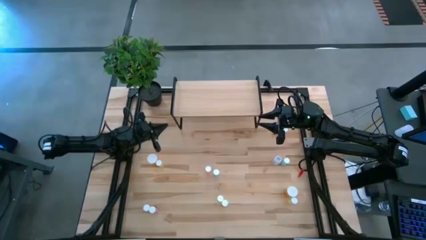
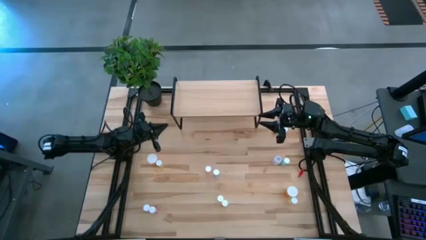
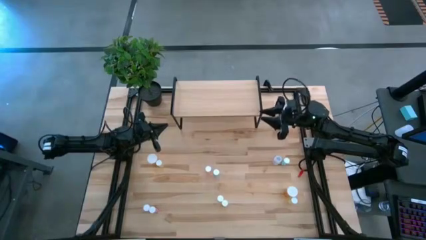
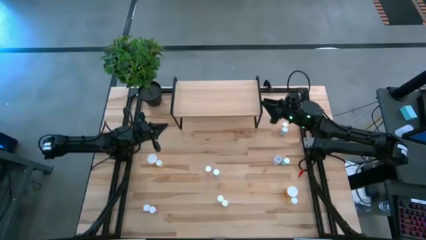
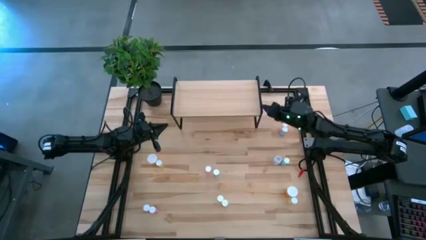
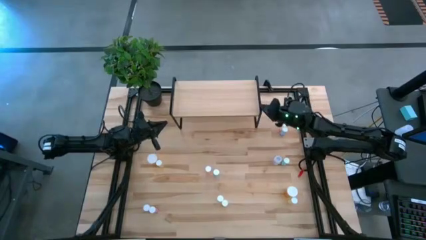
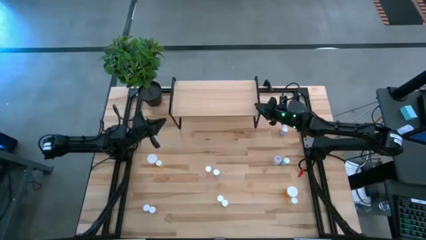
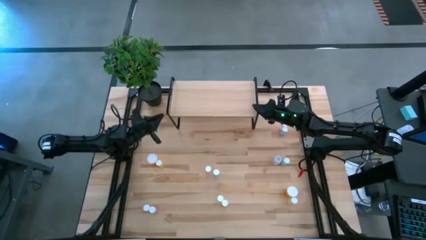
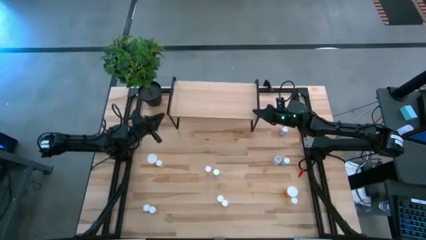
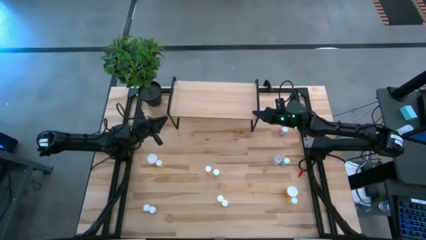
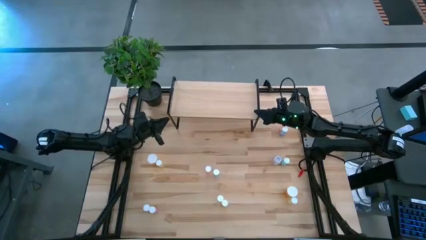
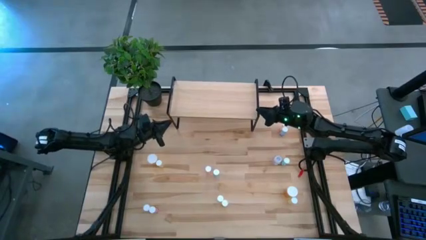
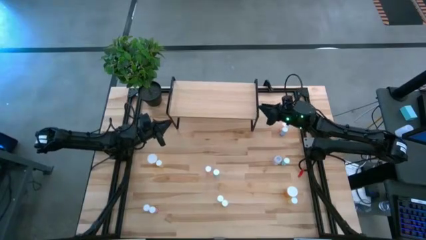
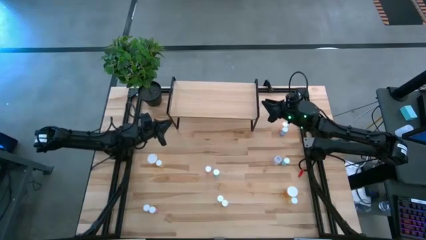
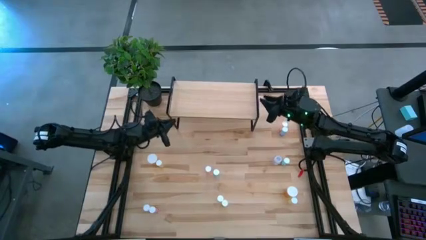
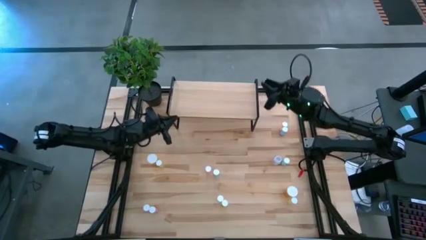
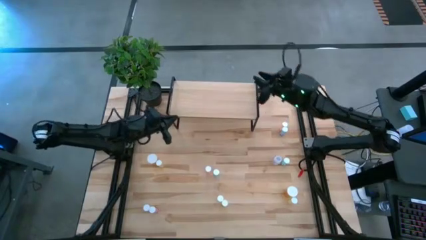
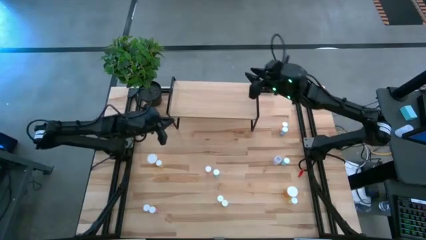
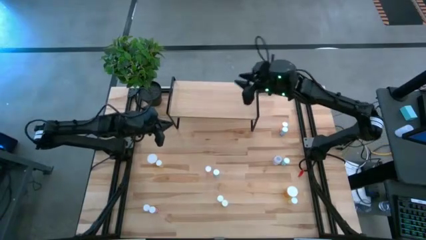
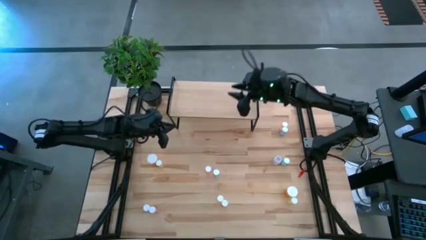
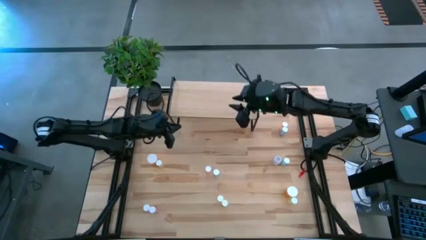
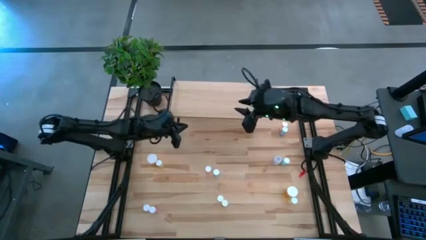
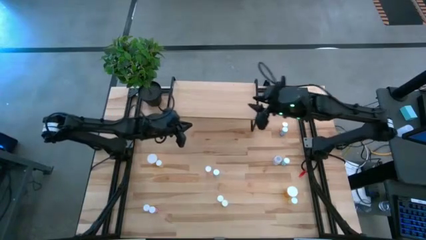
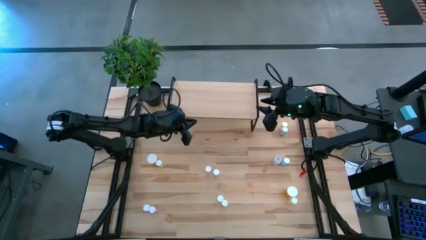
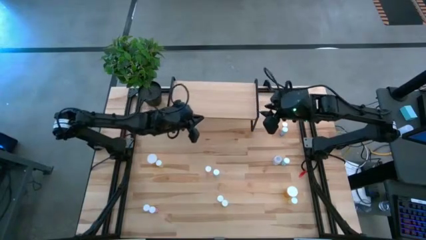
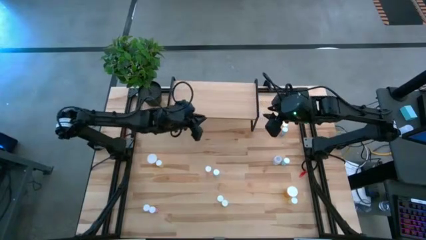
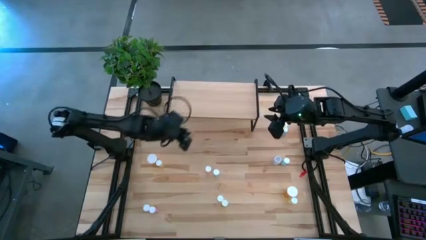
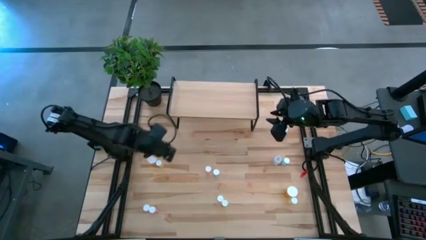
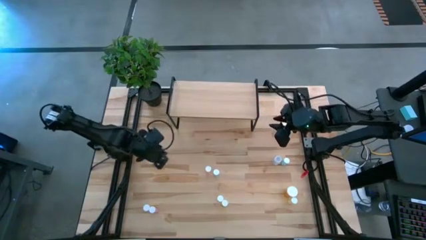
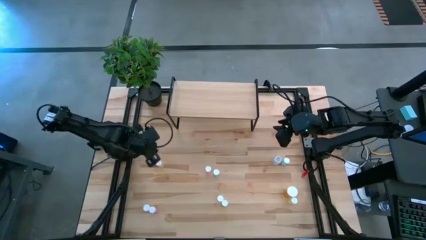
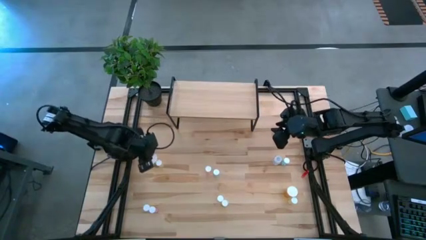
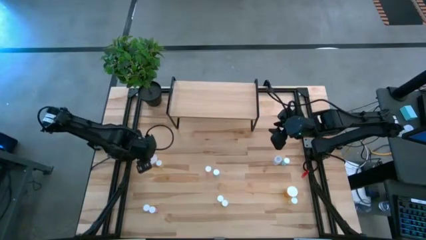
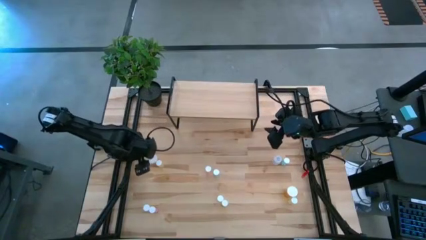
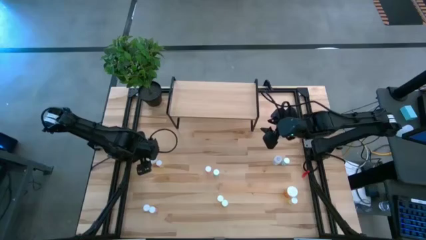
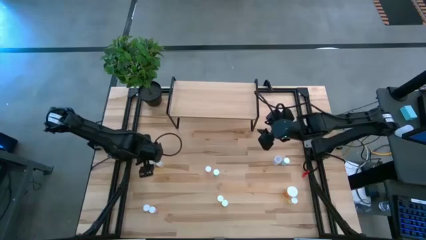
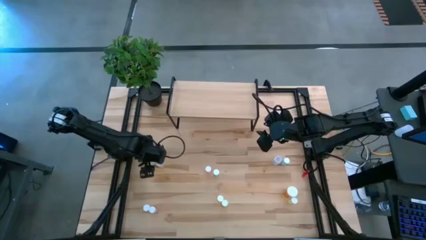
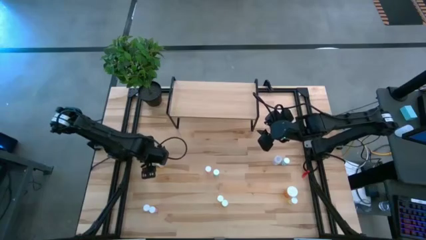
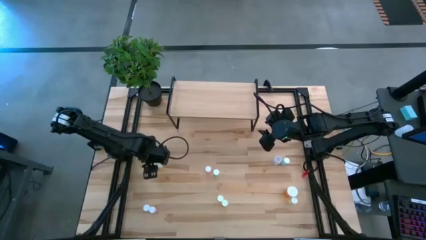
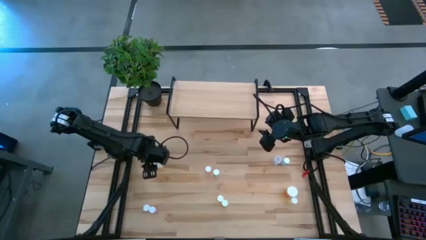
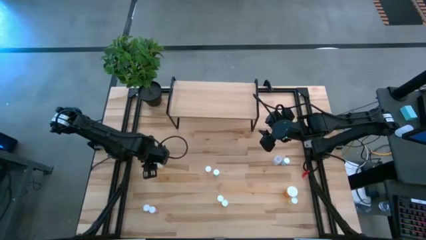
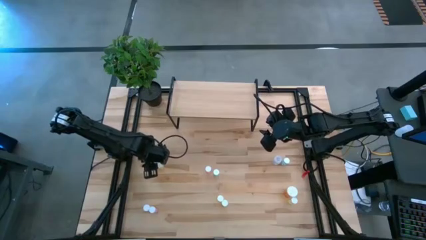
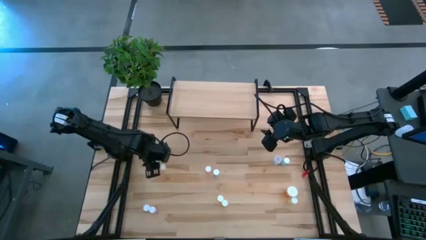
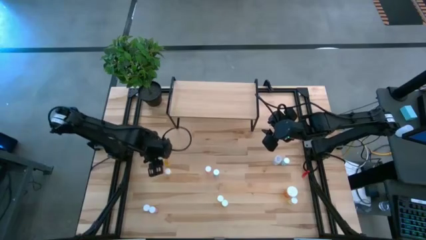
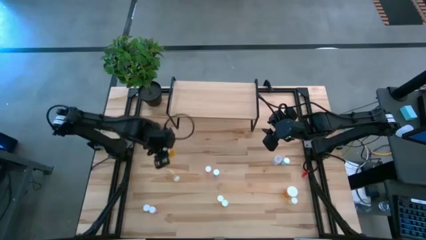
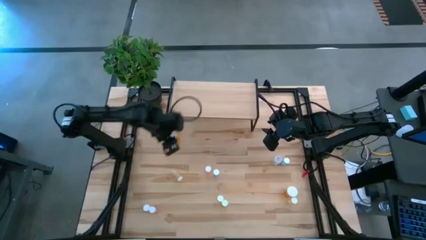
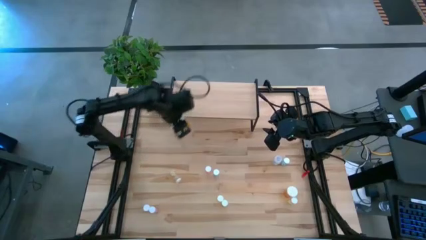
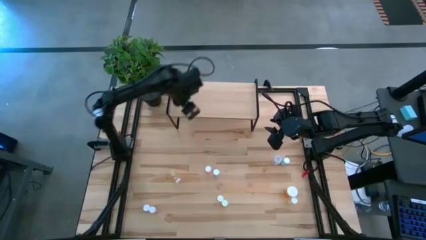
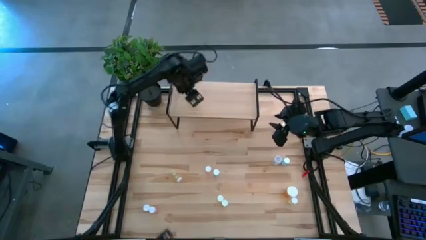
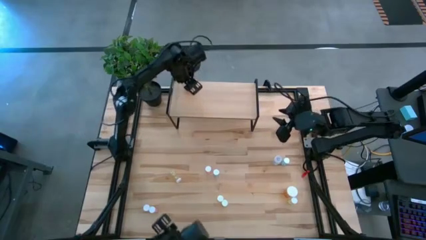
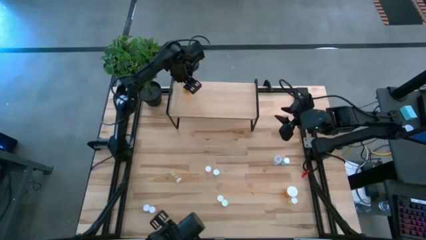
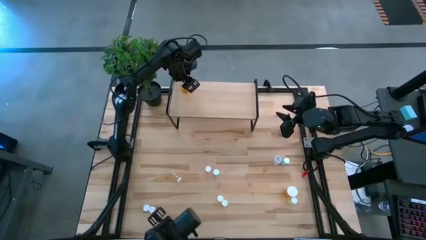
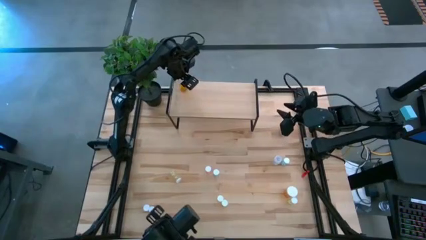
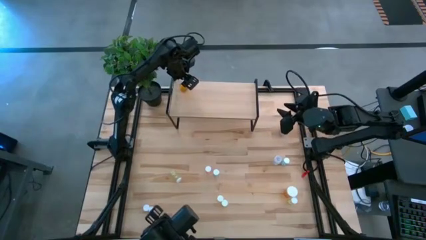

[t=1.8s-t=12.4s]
Task: Pick and place medicine bottles onto shelf by color
Put the orange pill bottle on the shelf

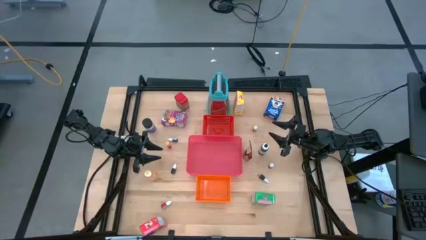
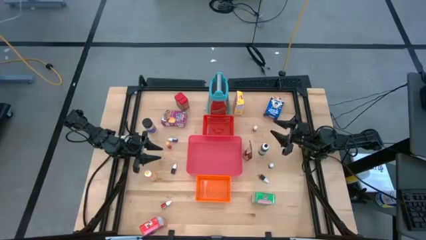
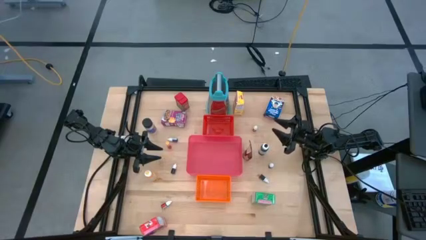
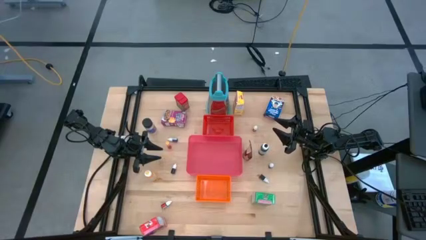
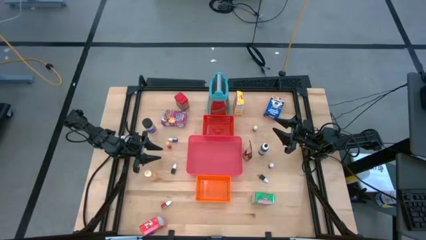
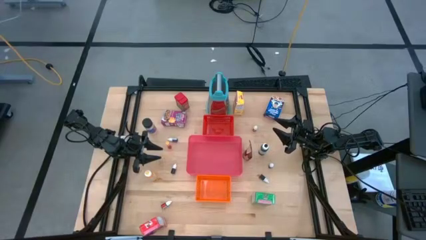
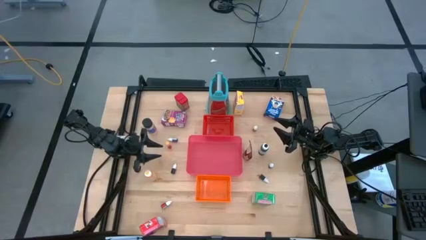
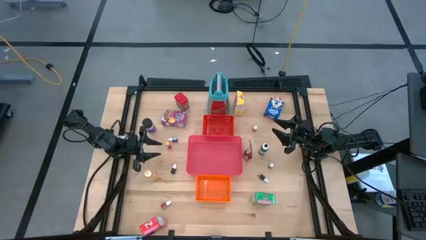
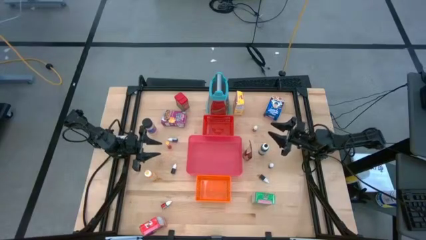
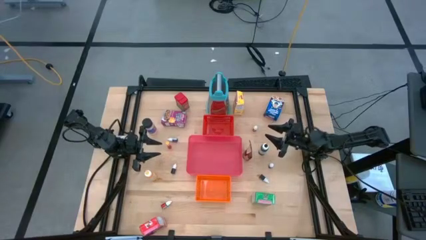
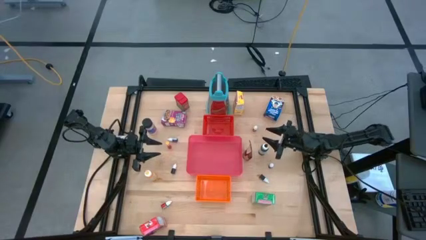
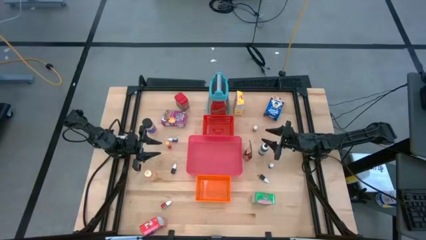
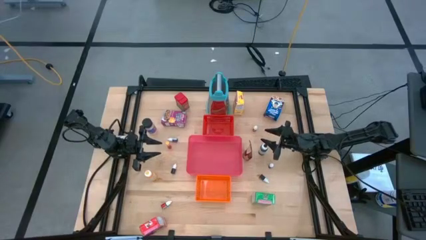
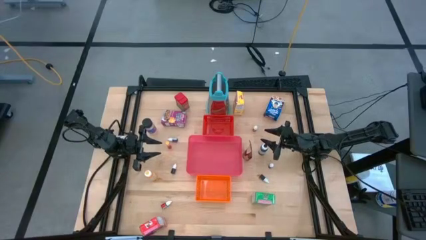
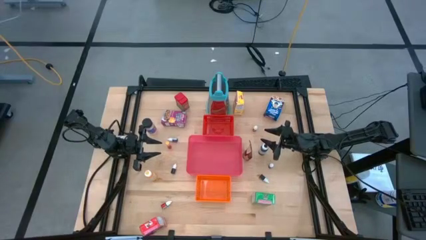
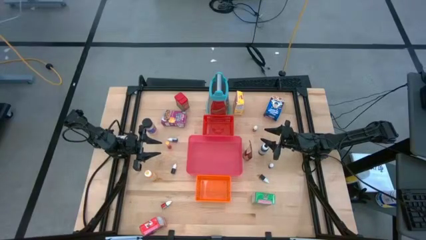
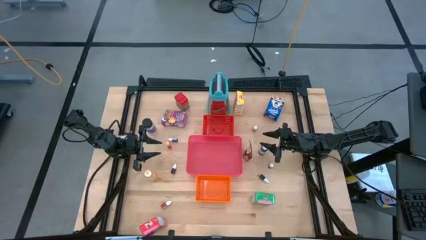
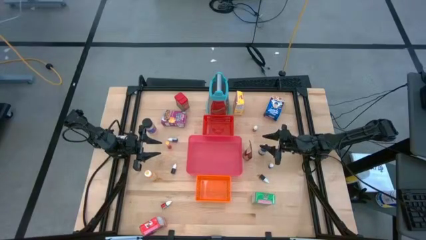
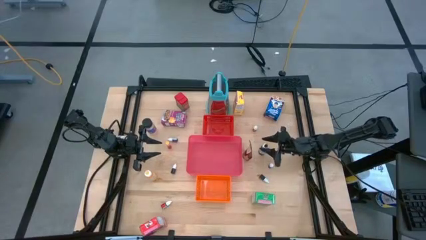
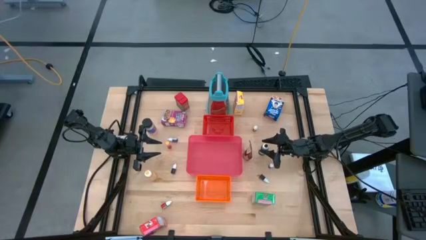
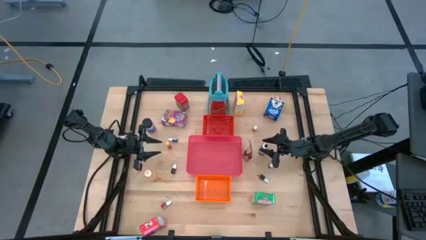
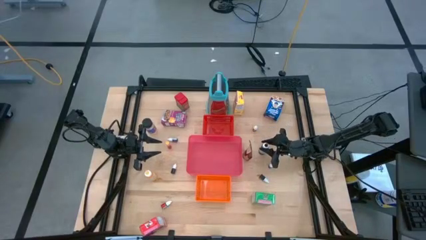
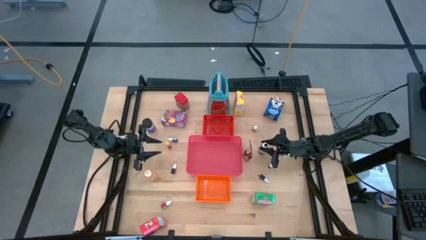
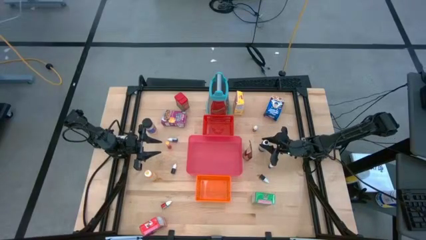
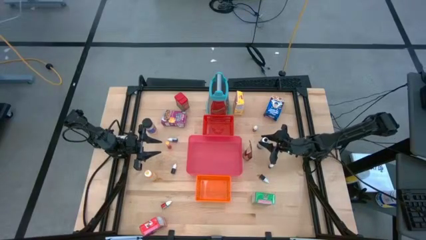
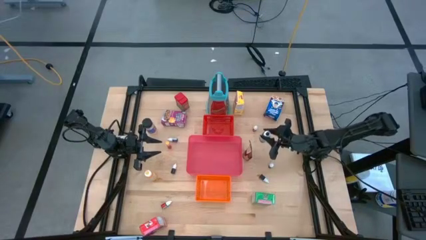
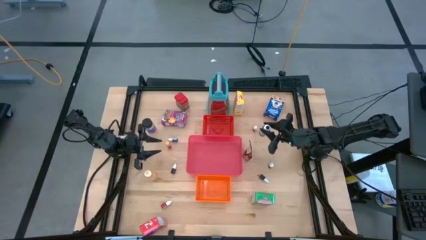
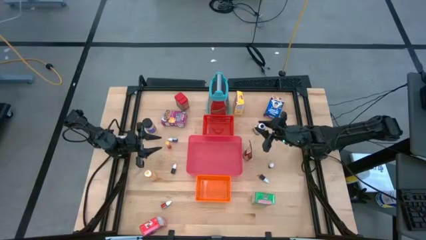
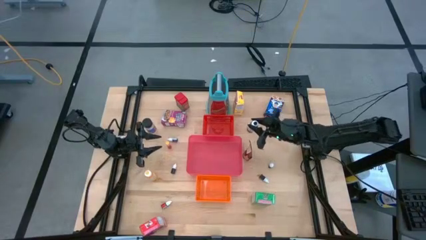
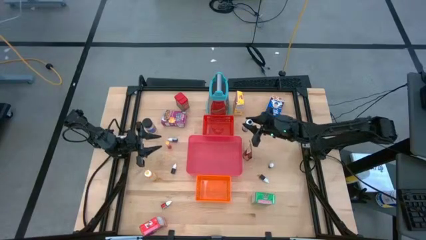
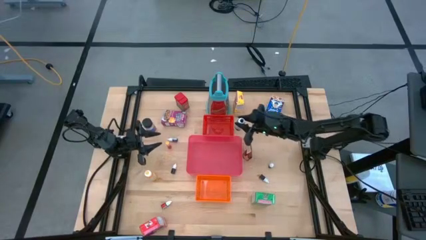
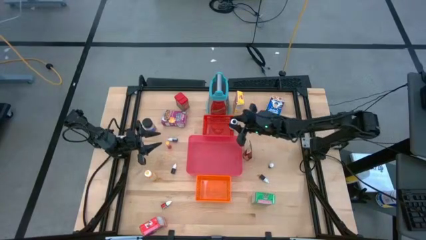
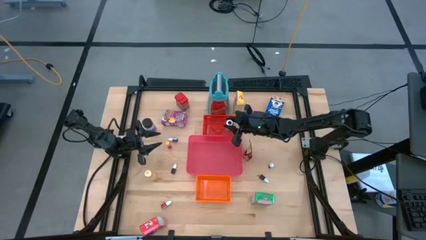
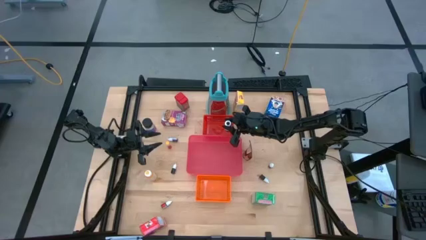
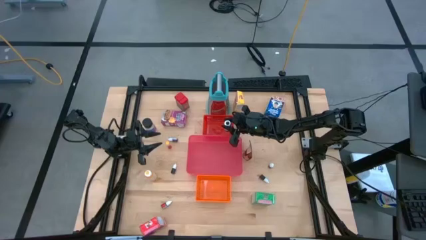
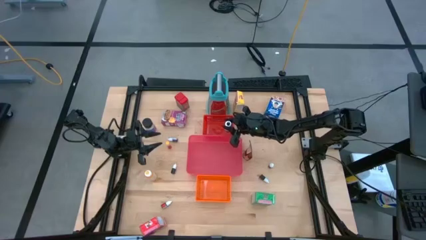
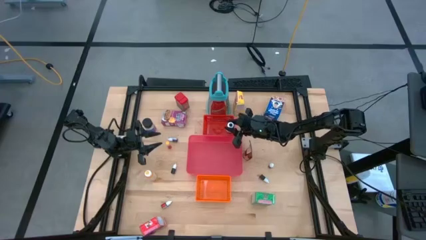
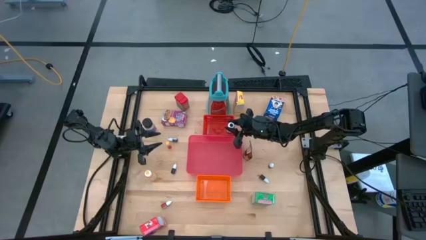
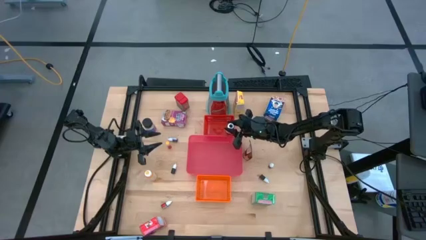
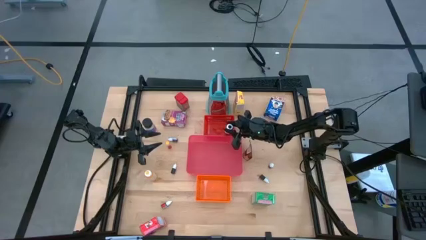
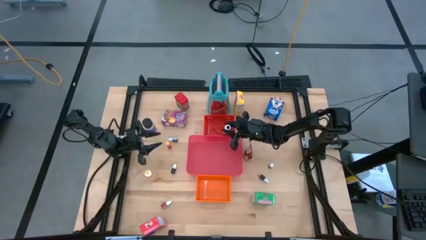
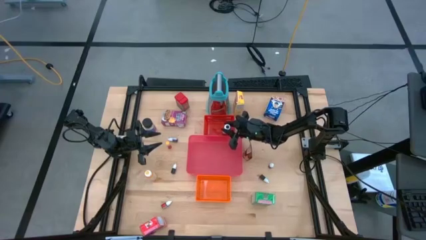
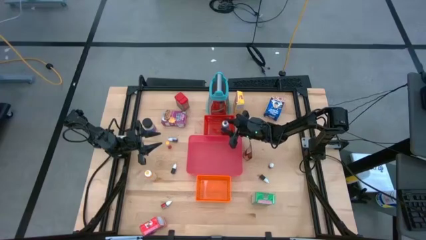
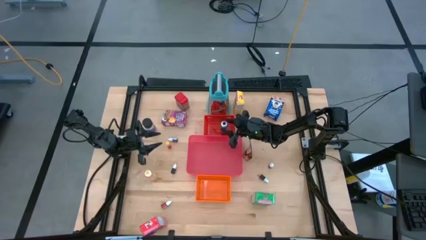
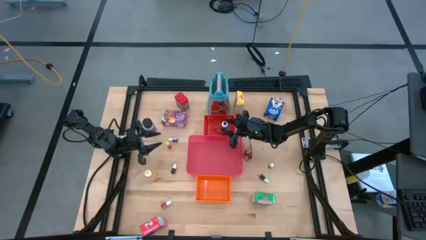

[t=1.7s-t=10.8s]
Task: Pick & Place Kitchen Items
Put the big black food coloring bottle into the red bin
